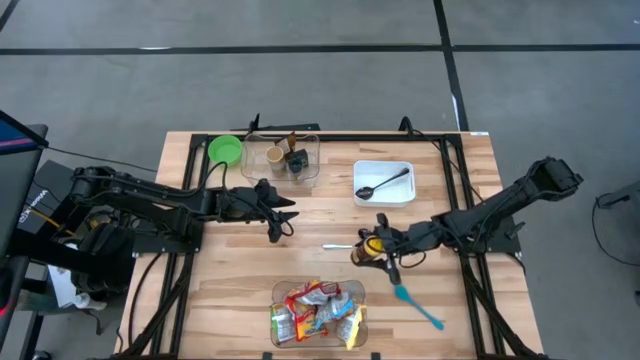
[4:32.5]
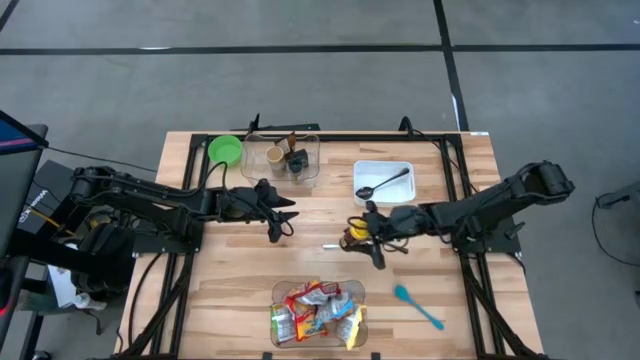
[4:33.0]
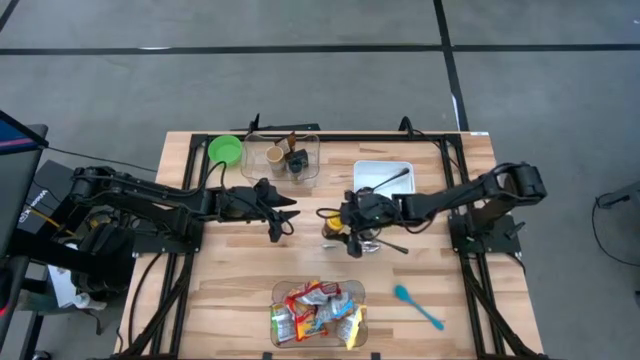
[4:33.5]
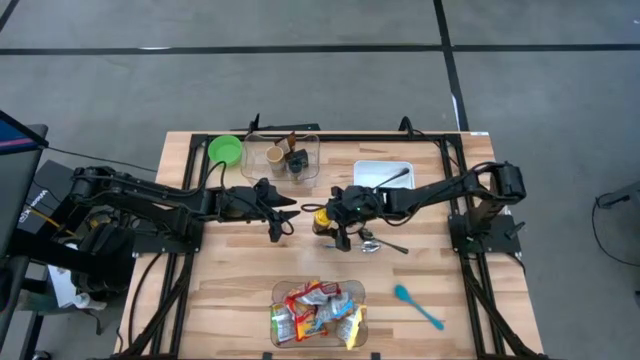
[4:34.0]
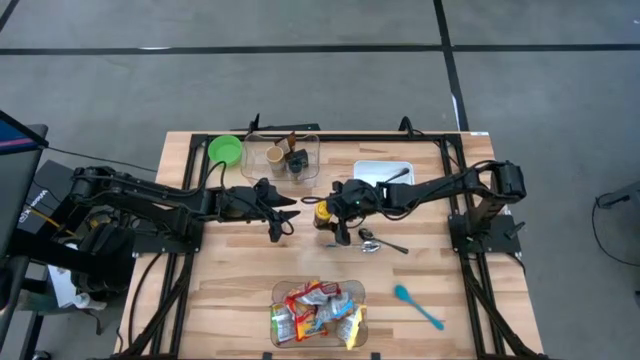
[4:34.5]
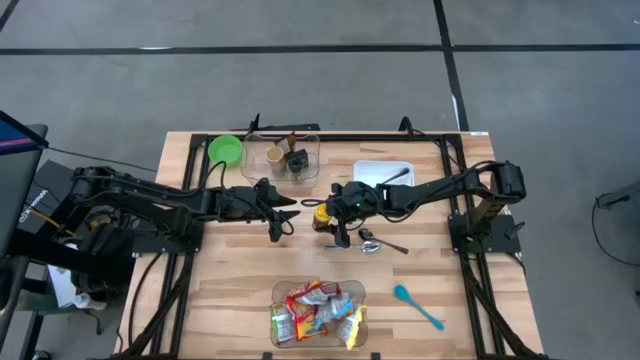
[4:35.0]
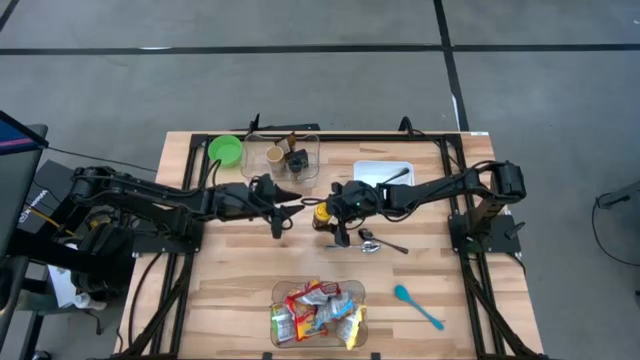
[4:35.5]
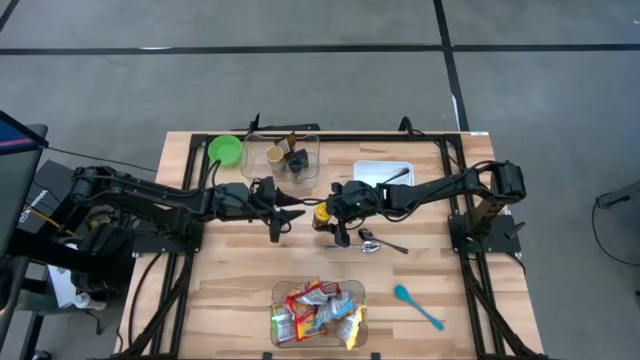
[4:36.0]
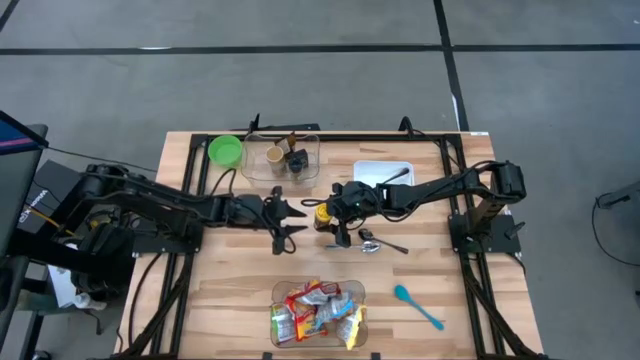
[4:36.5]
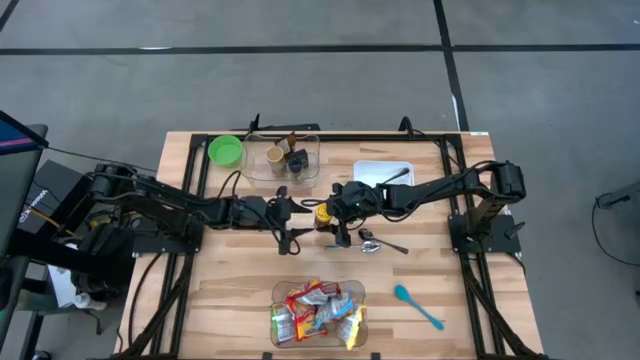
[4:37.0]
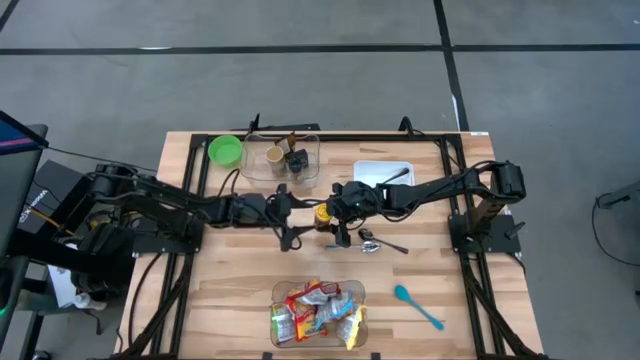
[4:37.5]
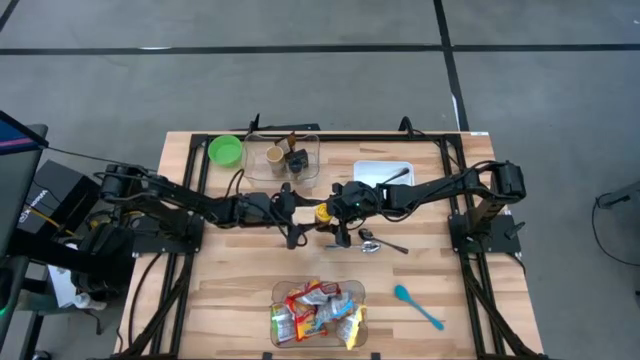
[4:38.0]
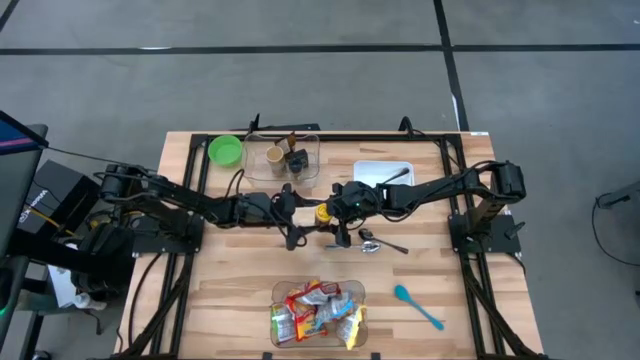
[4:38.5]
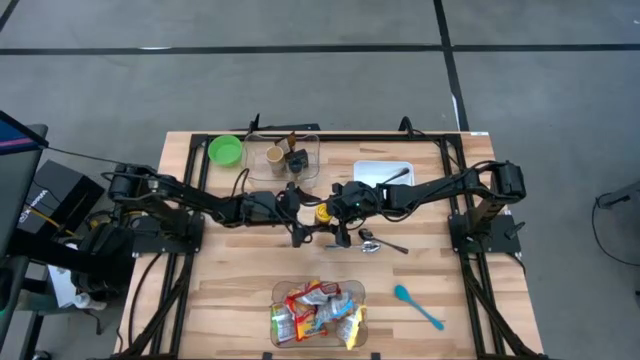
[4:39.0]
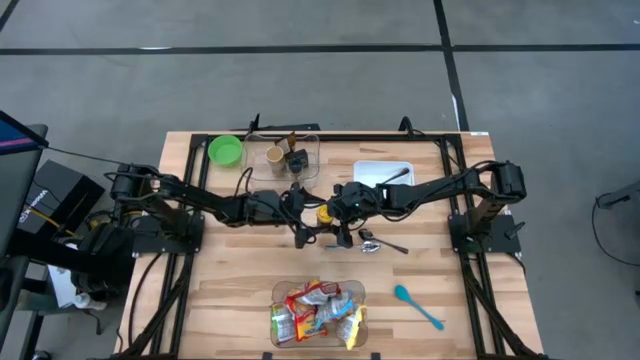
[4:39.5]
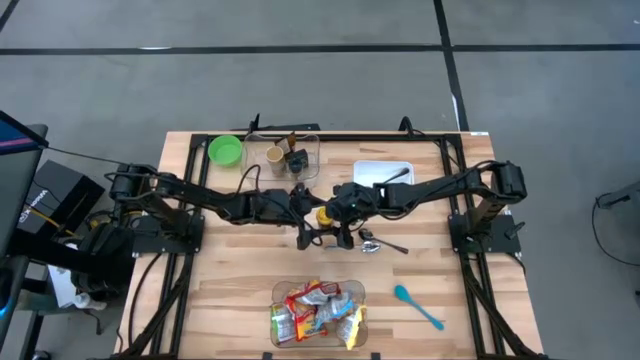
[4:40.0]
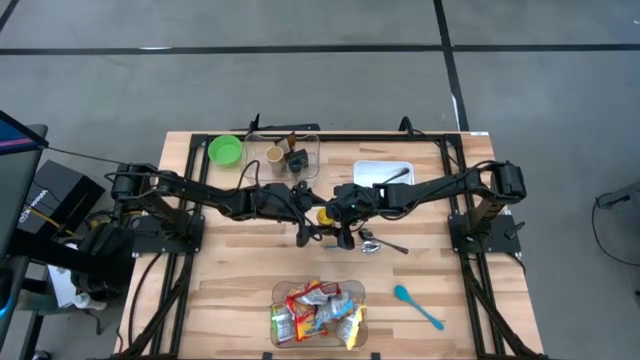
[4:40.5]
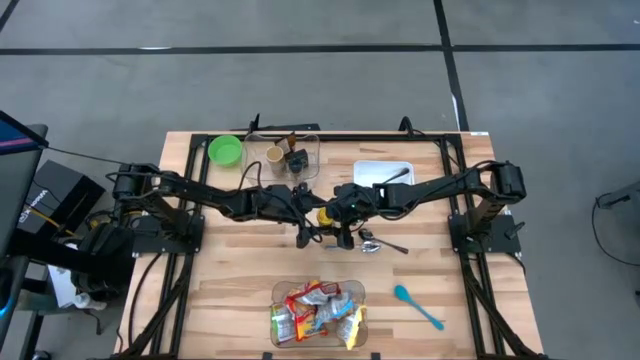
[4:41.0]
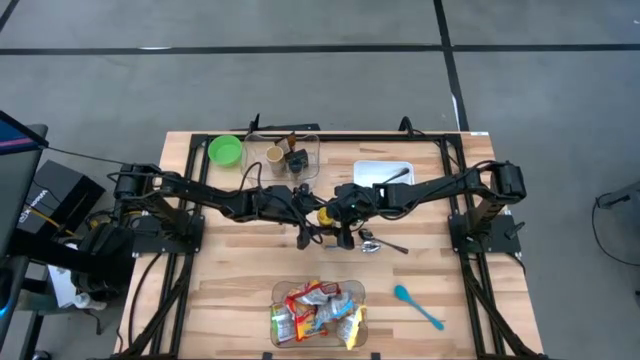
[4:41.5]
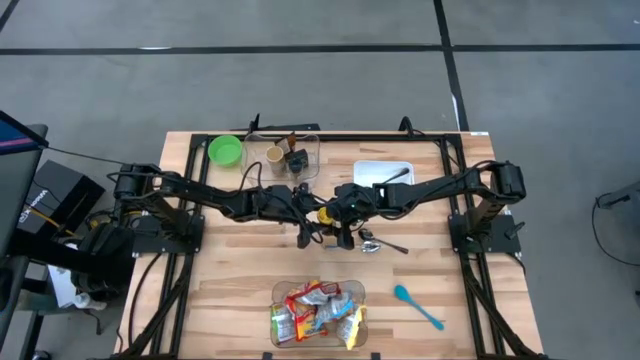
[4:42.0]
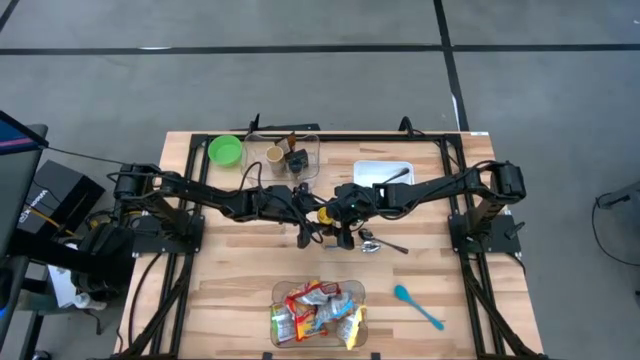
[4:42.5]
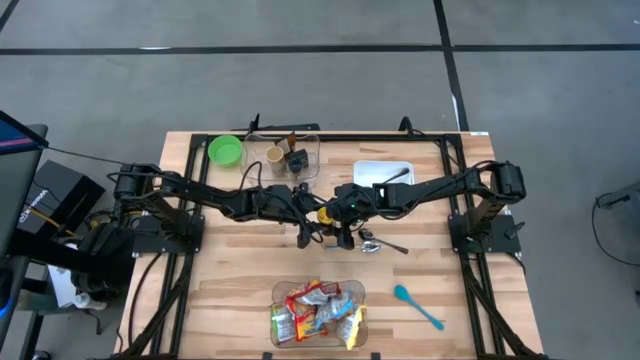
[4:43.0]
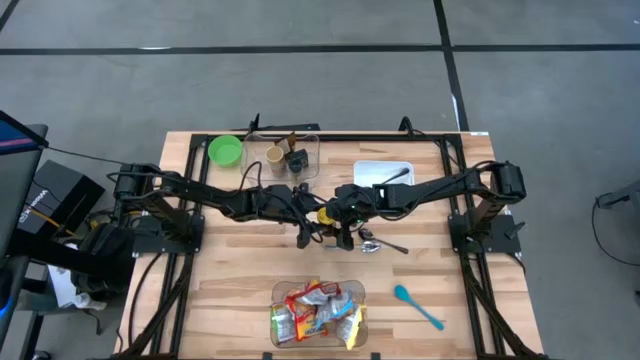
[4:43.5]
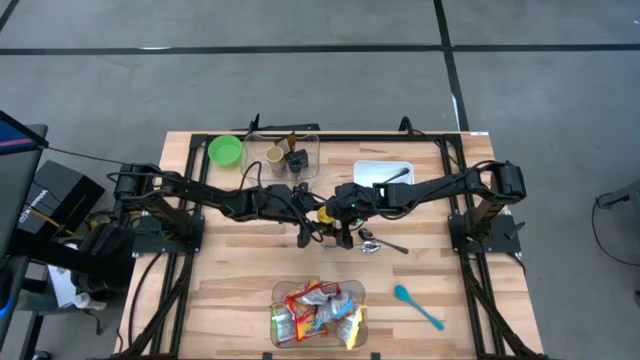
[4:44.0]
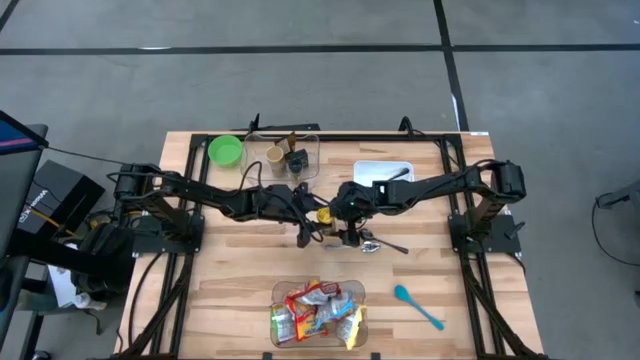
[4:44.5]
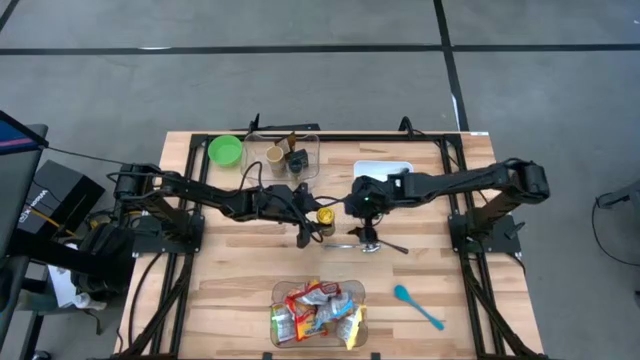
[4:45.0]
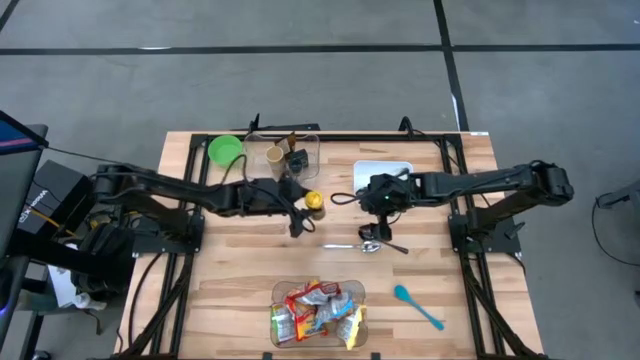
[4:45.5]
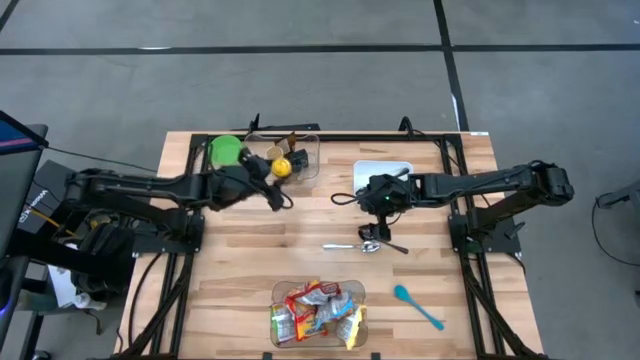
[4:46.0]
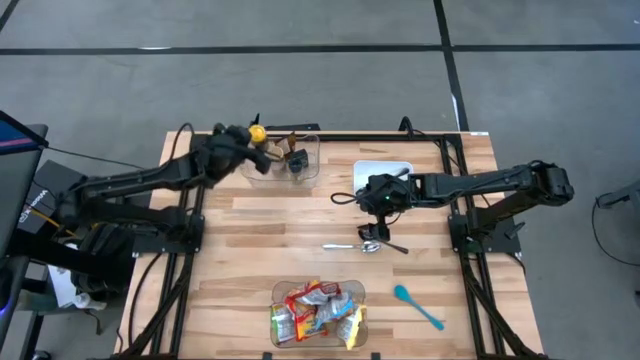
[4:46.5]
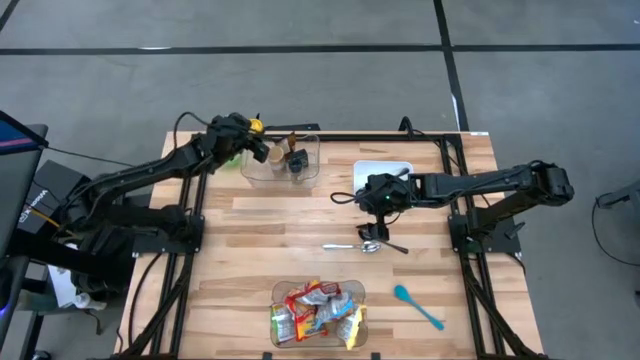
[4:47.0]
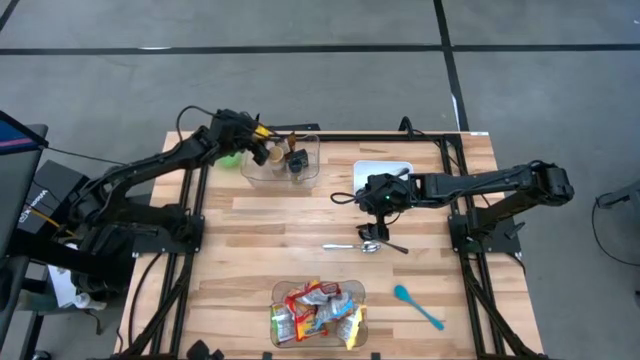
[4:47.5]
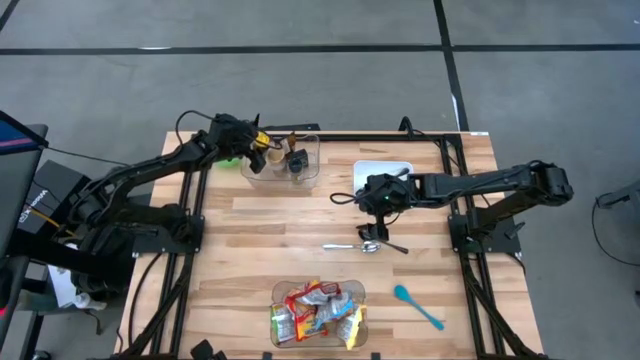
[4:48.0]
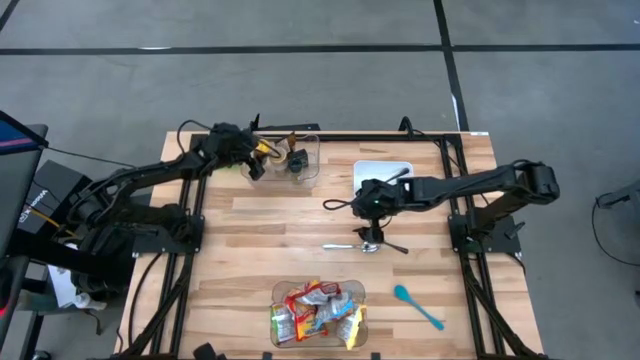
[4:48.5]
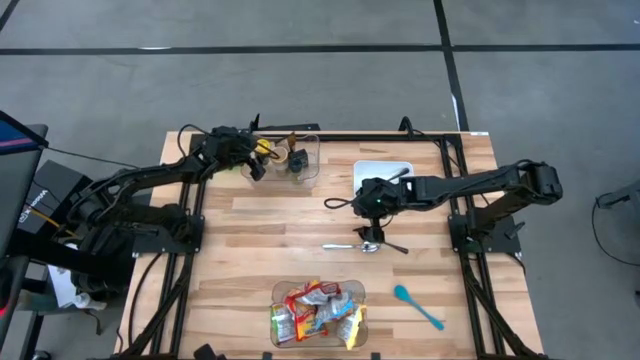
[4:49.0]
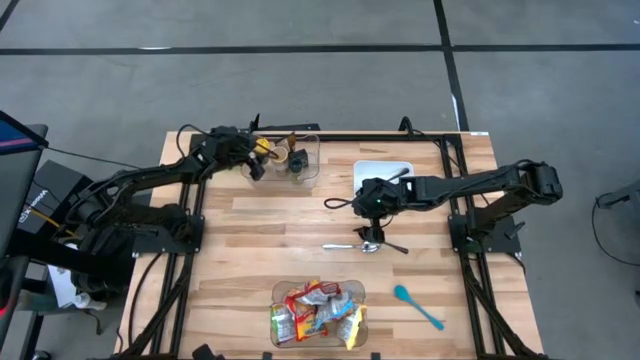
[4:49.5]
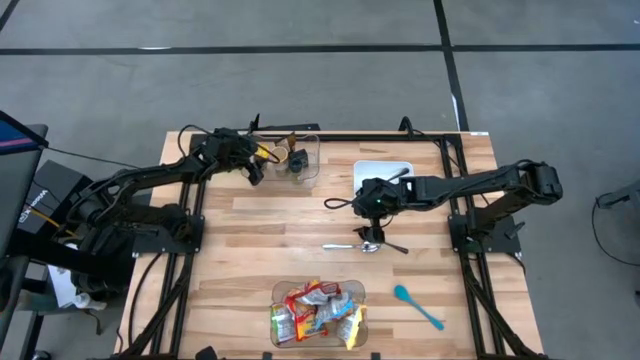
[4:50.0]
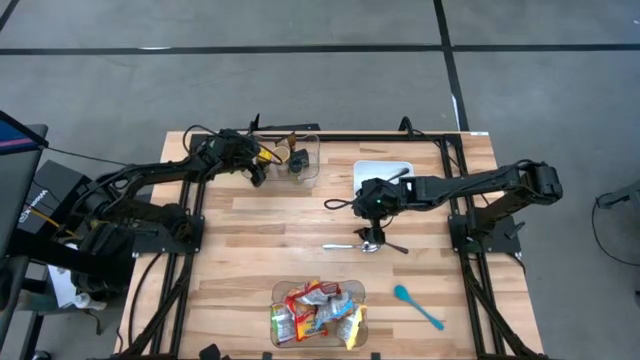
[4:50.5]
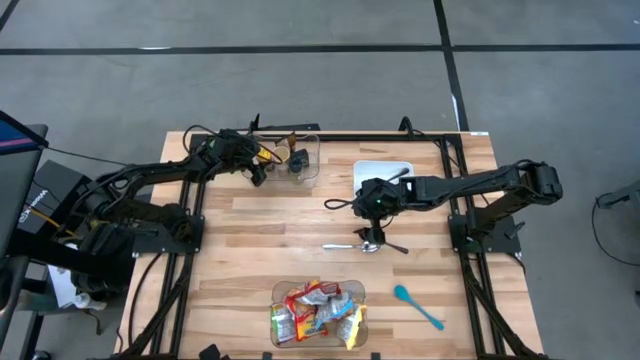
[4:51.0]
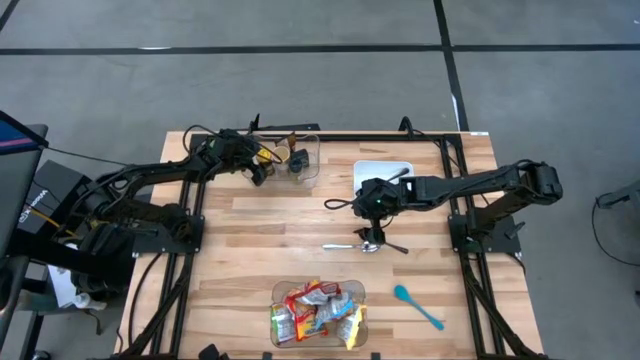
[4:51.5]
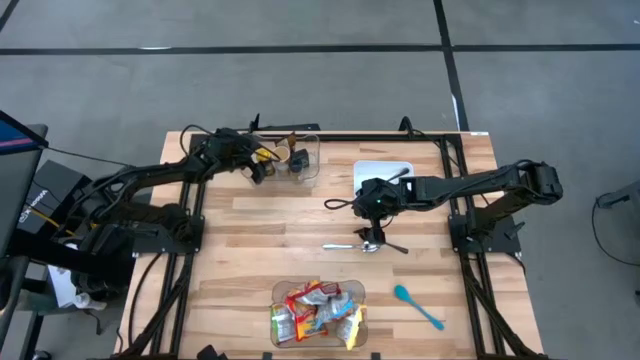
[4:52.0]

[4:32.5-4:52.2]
Task: Pick & Place Food Item
Put the yellow seasoning bottle into the top transparent bin

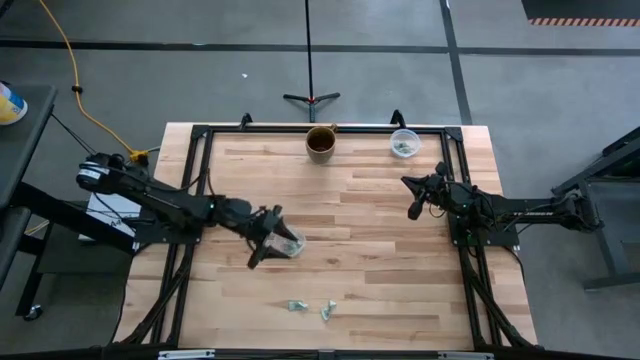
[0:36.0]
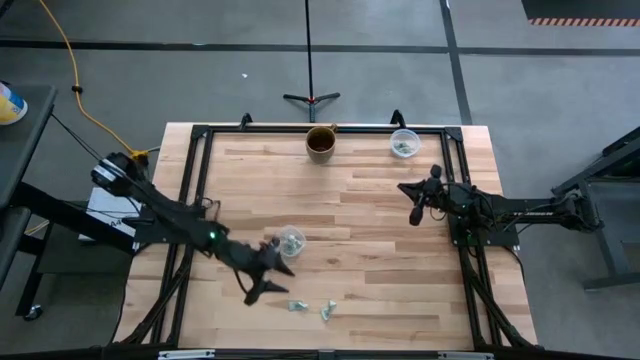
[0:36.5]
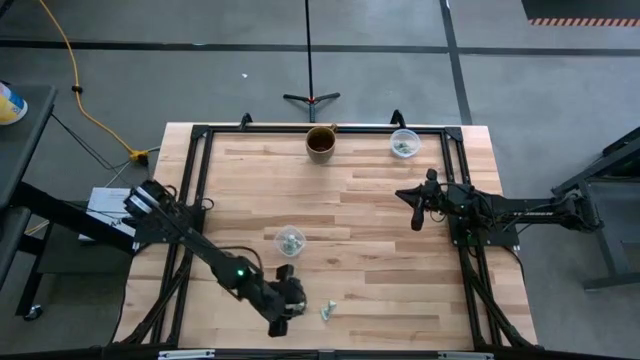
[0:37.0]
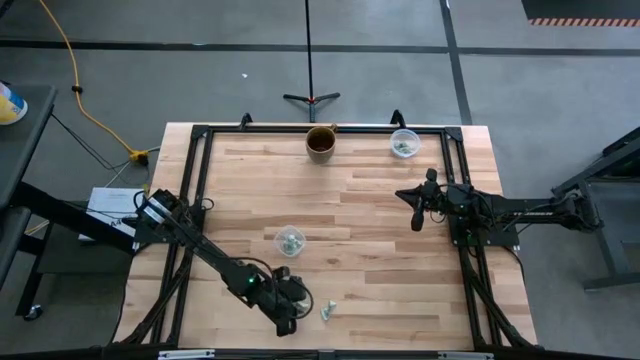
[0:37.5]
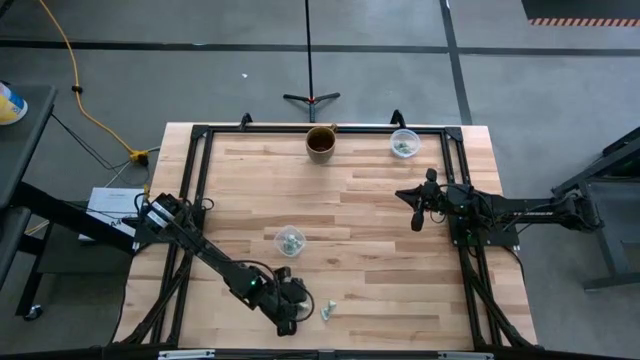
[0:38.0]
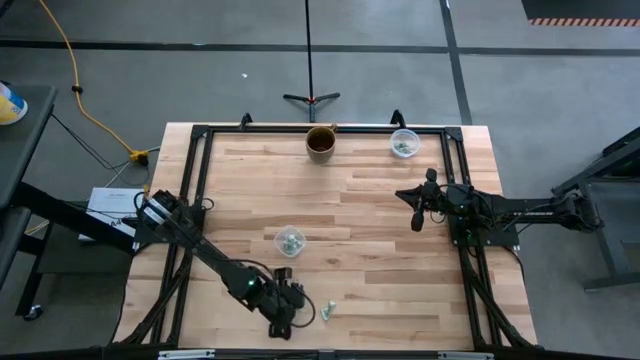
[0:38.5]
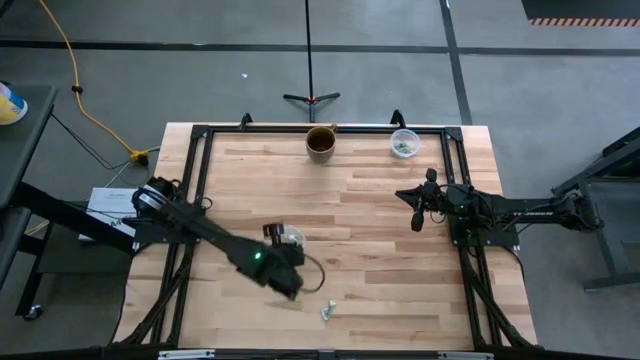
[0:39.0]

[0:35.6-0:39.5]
Task: Pick and place items into bin
Put the stevia packet into the bottom transparent bin
